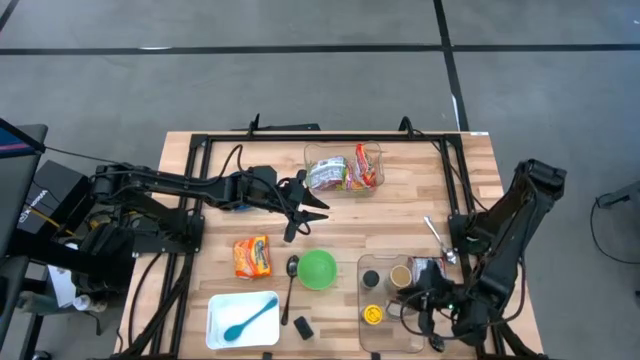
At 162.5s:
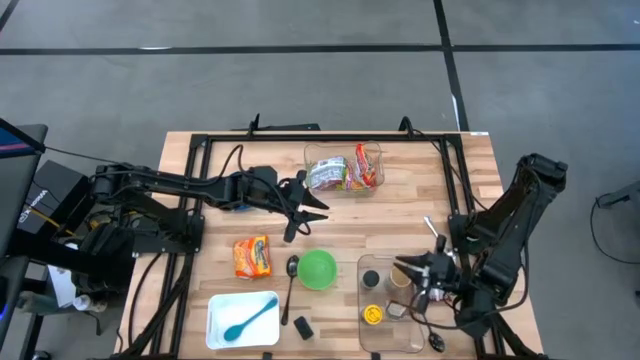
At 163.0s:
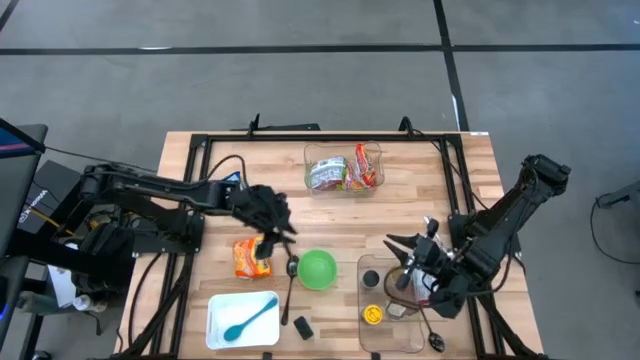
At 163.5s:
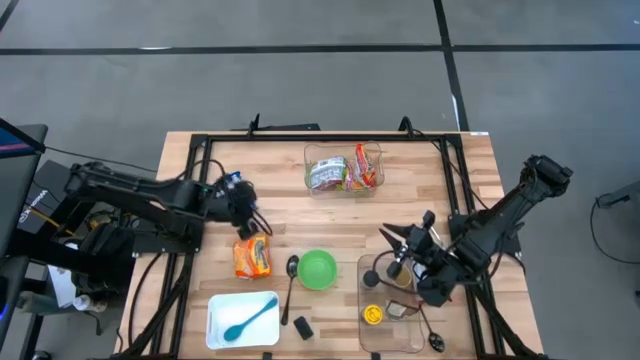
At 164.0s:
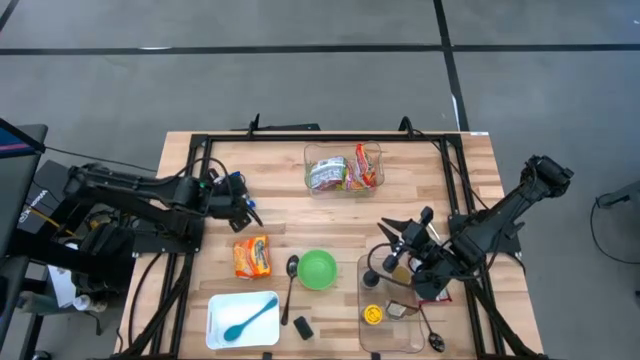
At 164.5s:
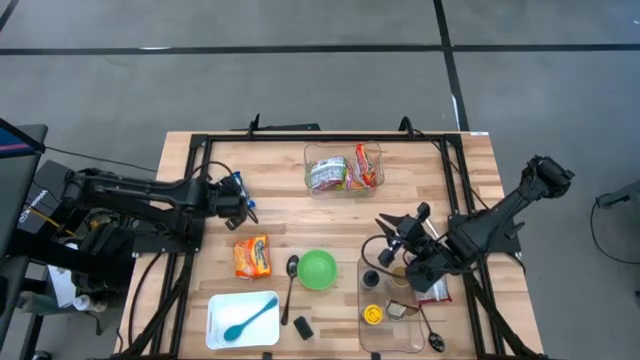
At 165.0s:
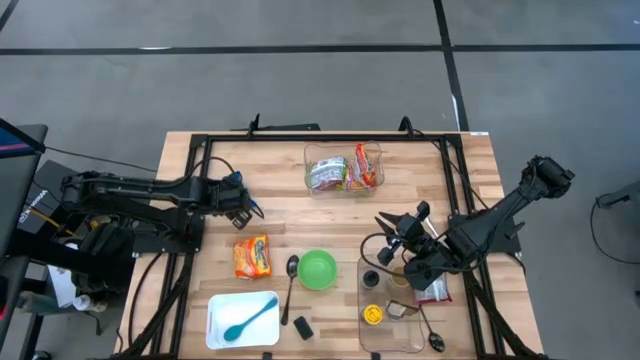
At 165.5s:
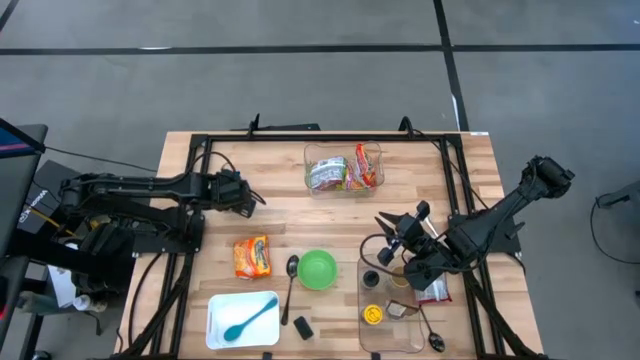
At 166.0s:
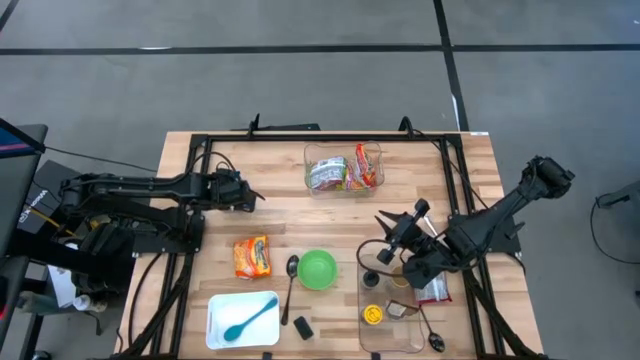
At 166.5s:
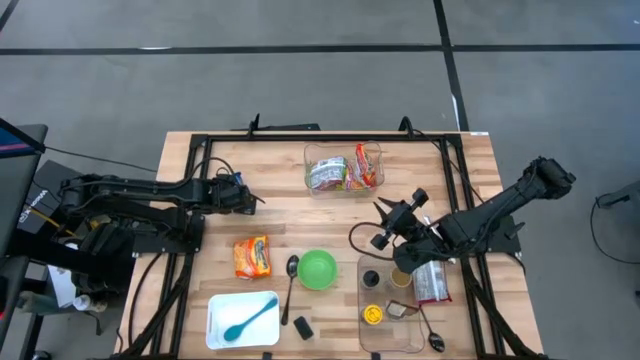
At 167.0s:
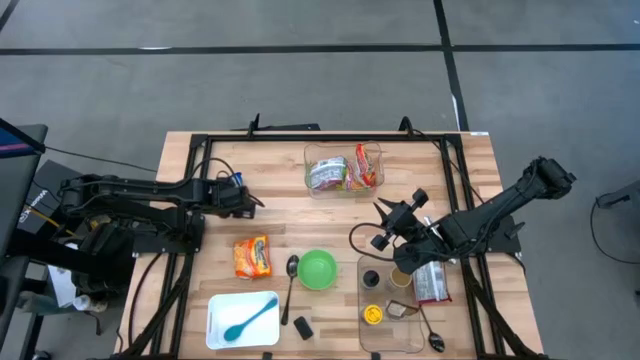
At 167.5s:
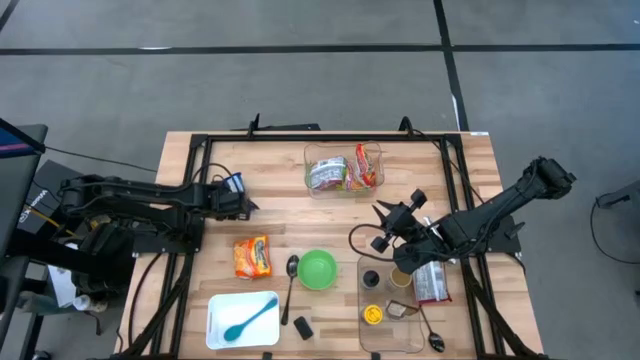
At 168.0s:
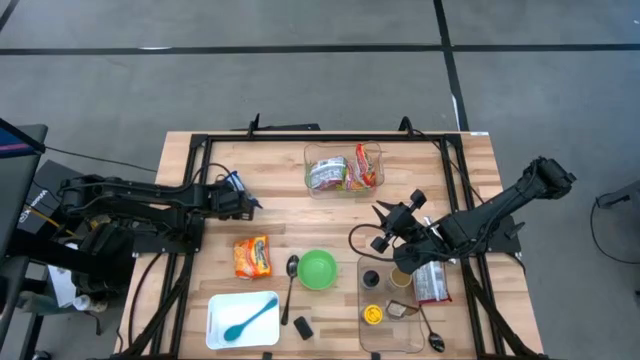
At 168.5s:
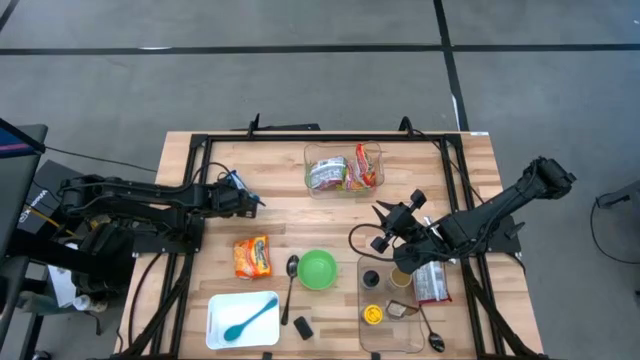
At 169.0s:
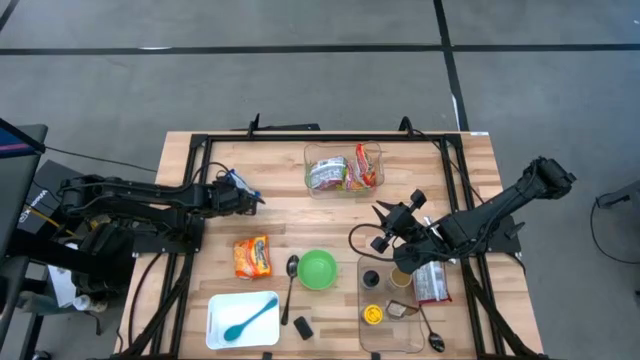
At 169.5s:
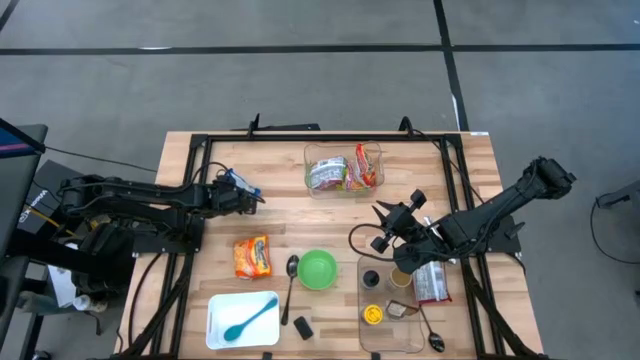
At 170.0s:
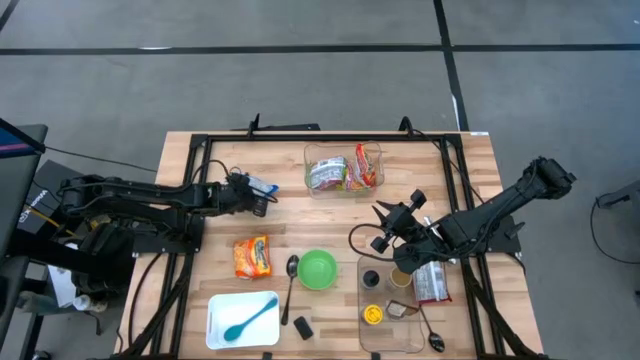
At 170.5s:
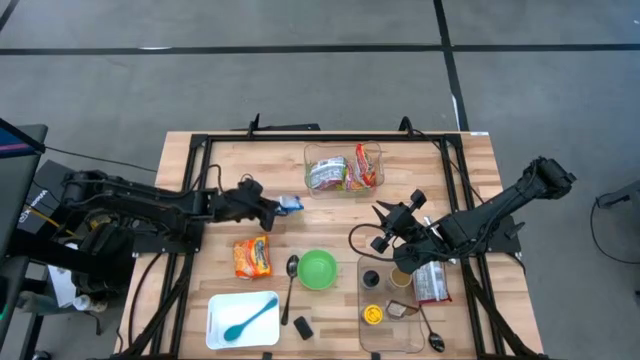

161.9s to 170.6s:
Task: Pick & Place Food Item
Put the blue noodle pack into the top transparent bin

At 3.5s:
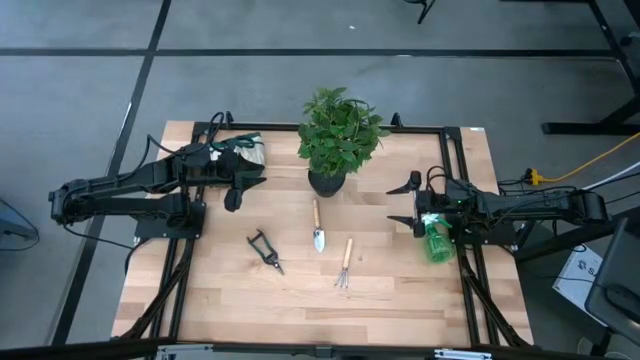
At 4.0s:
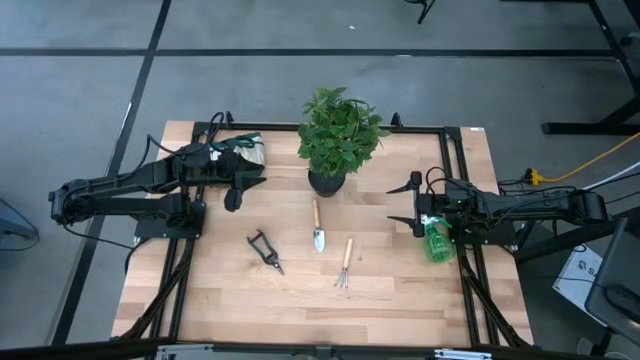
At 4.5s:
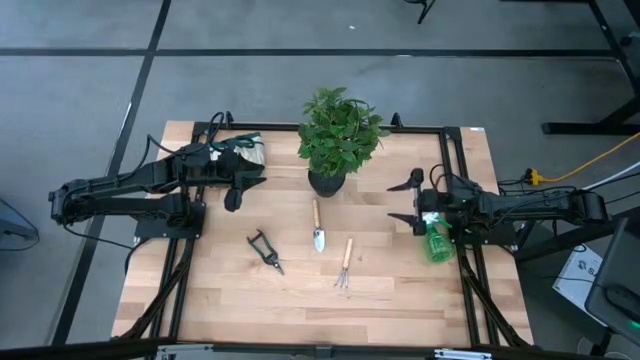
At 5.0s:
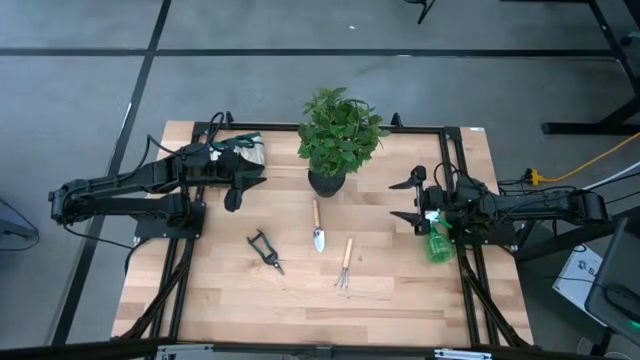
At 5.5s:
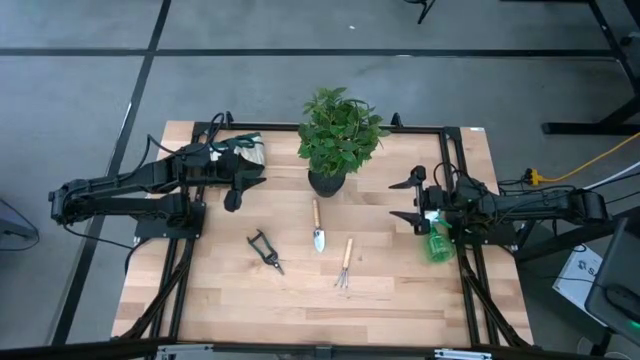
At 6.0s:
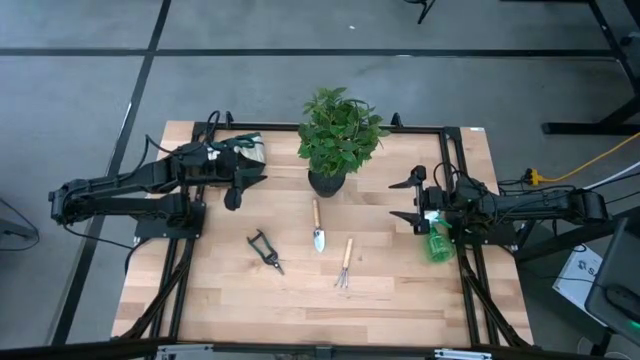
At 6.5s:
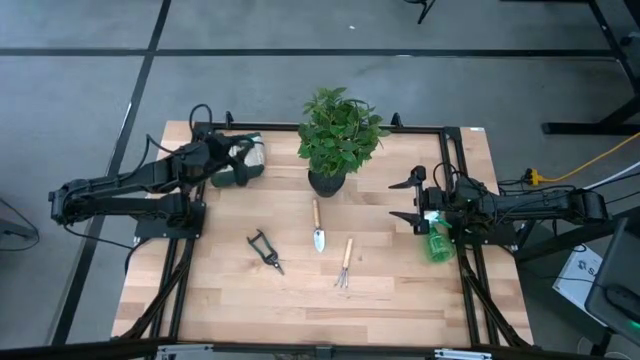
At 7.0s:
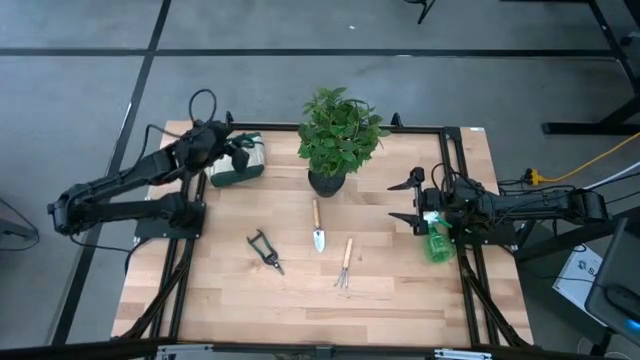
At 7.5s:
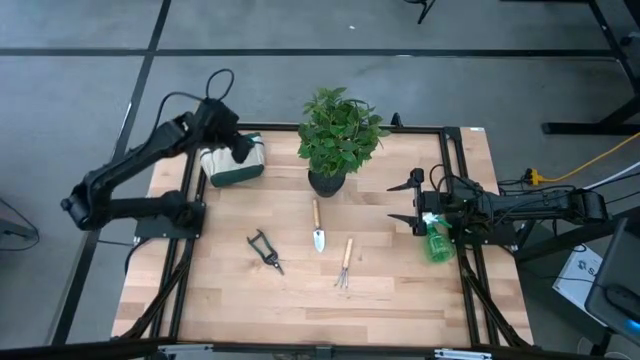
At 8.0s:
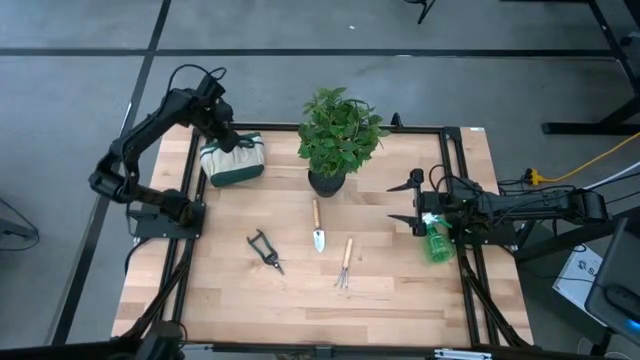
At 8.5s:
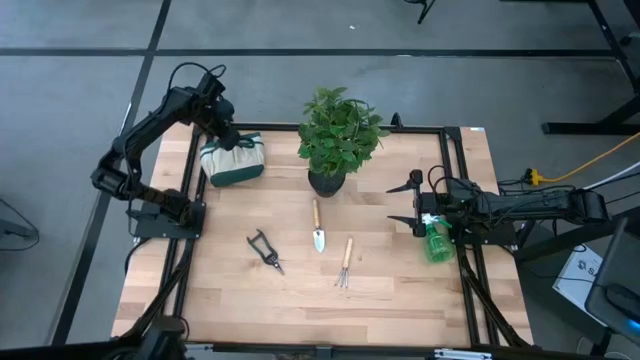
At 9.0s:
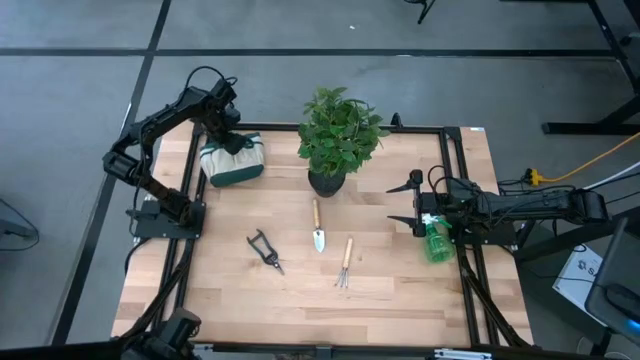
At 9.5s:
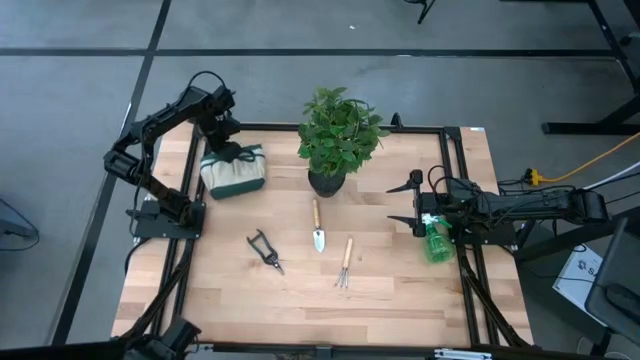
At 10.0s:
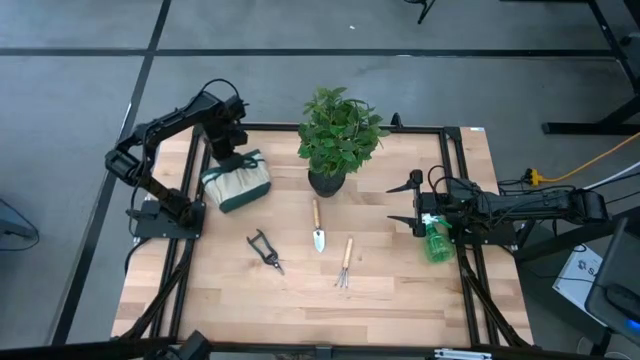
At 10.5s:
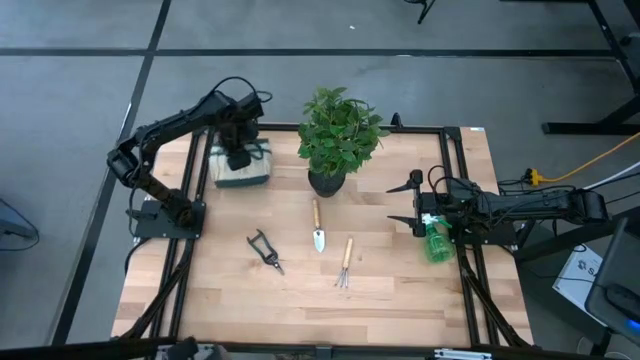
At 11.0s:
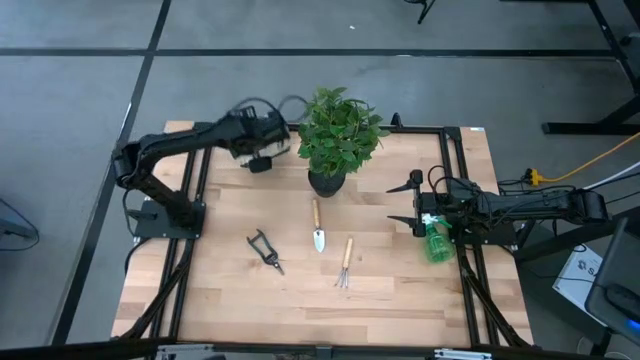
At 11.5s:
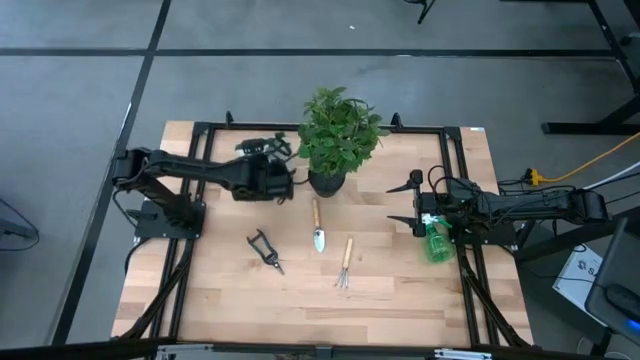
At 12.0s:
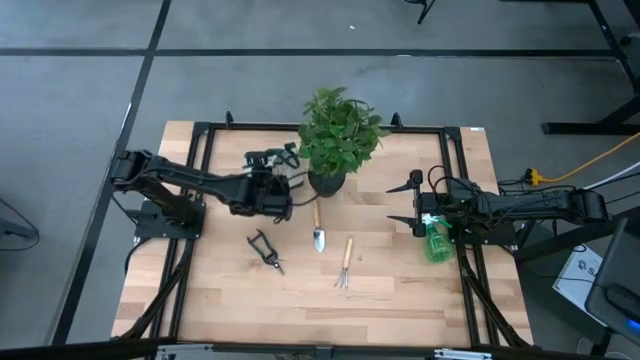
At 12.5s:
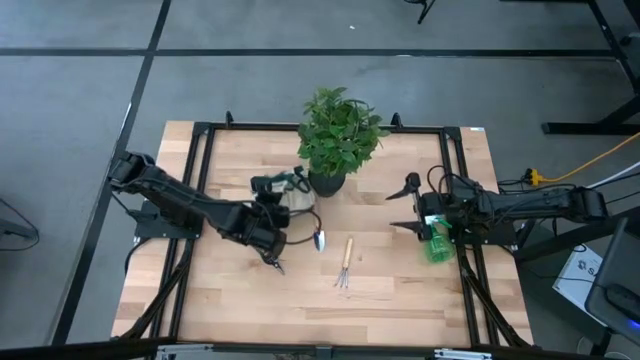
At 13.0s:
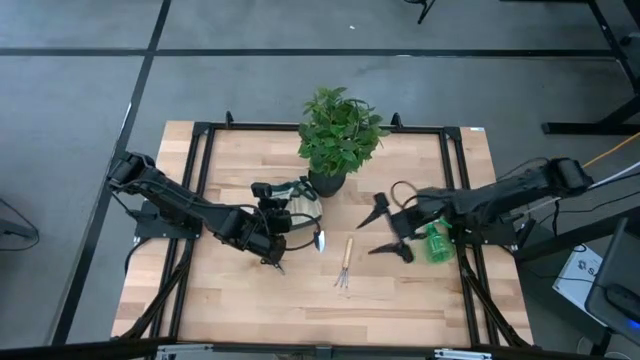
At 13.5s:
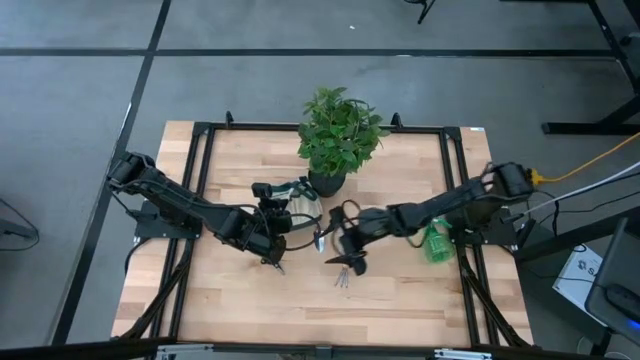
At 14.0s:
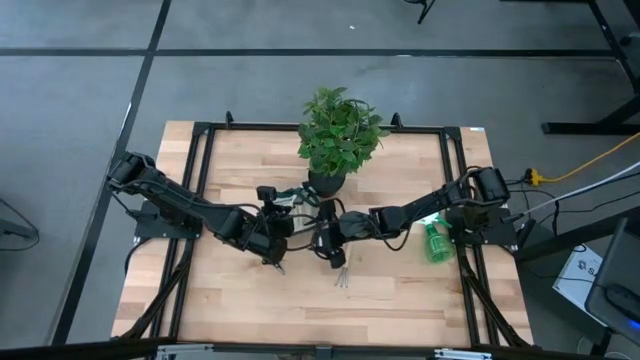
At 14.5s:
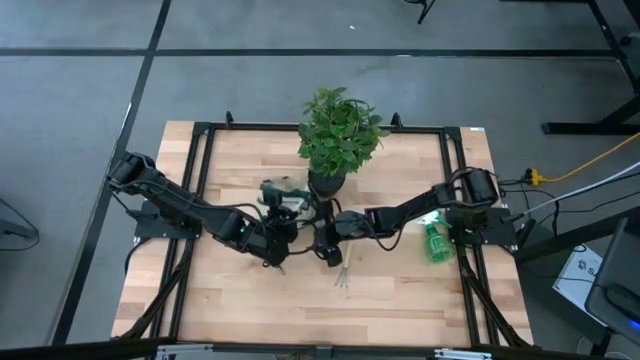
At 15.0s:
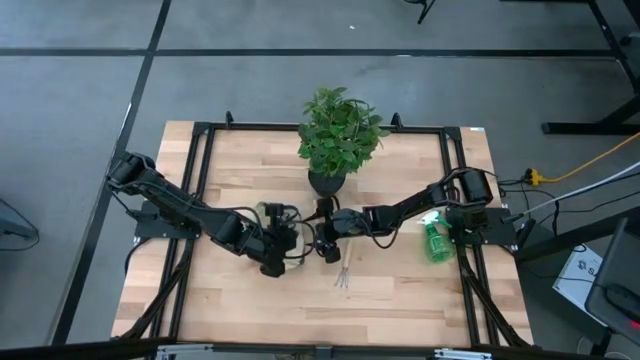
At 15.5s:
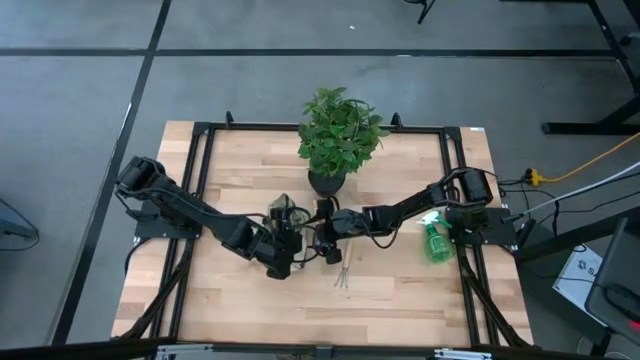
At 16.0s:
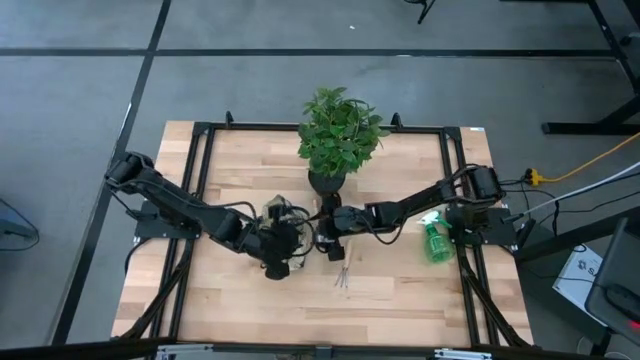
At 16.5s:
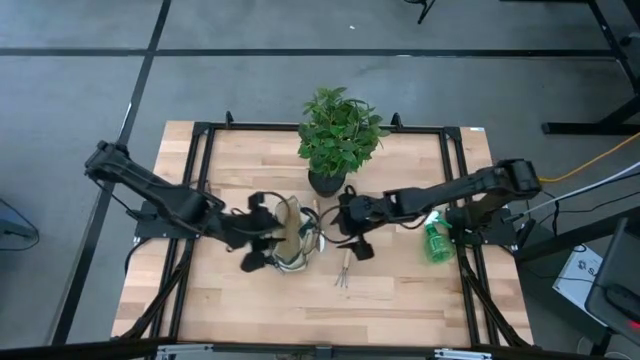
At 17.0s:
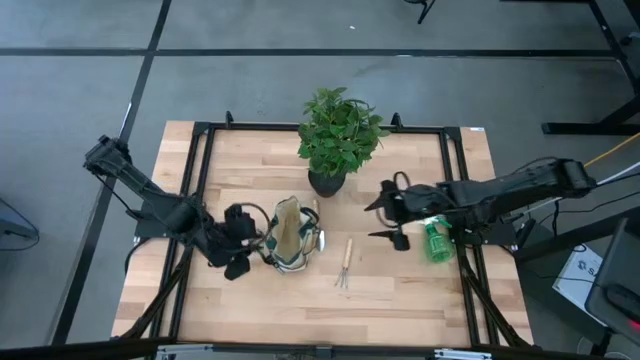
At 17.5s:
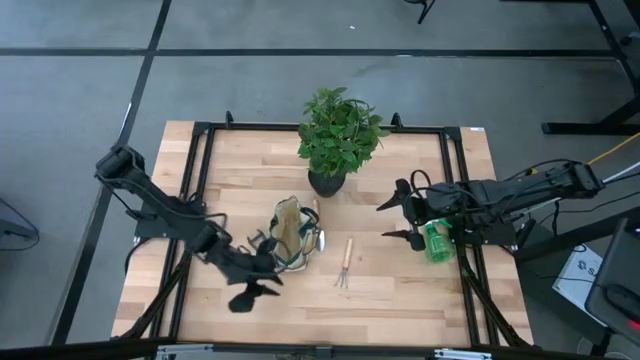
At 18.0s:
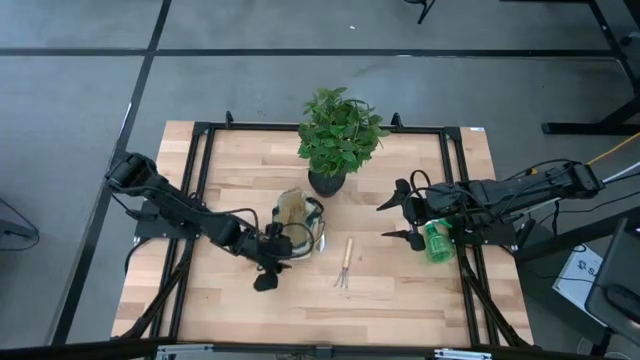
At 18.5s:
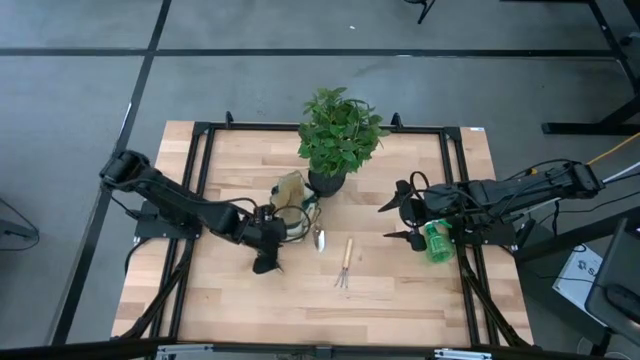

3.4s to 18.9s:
Task: Pick & Place Garden tools in Gardening bag
Move the white bag to the center of the table
